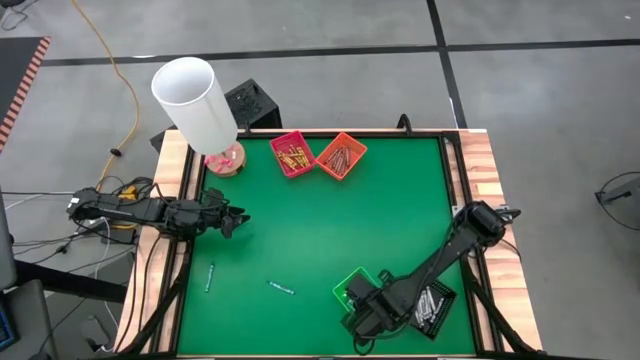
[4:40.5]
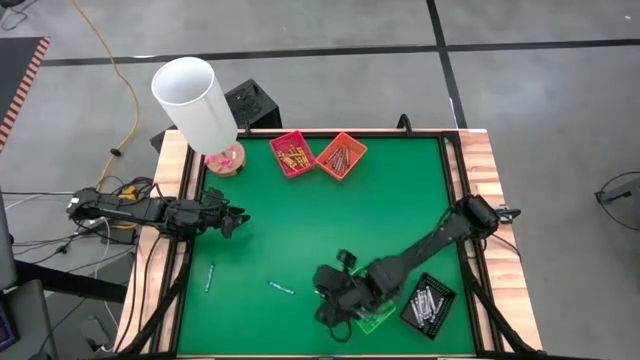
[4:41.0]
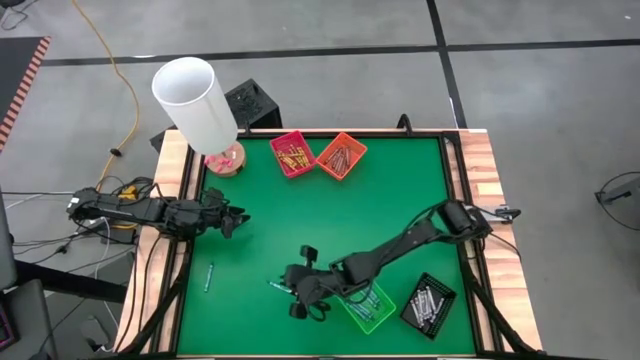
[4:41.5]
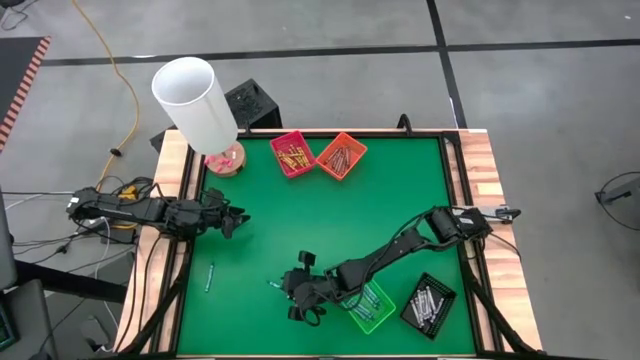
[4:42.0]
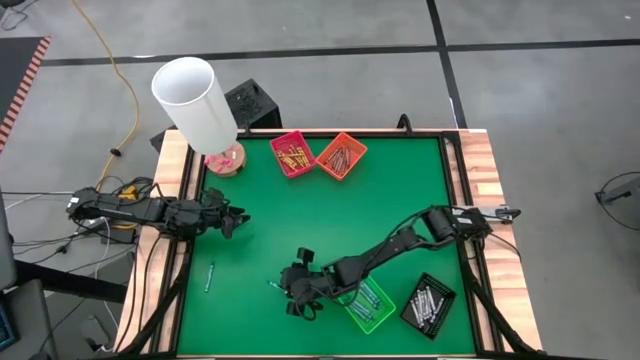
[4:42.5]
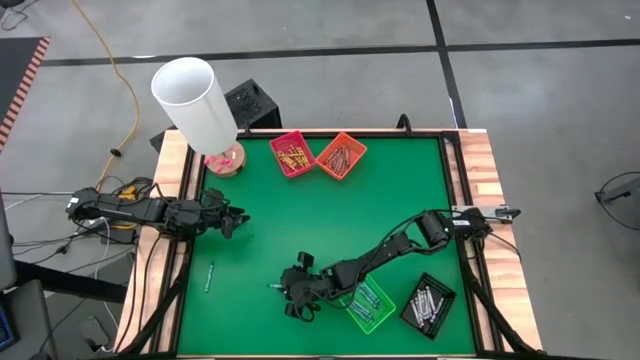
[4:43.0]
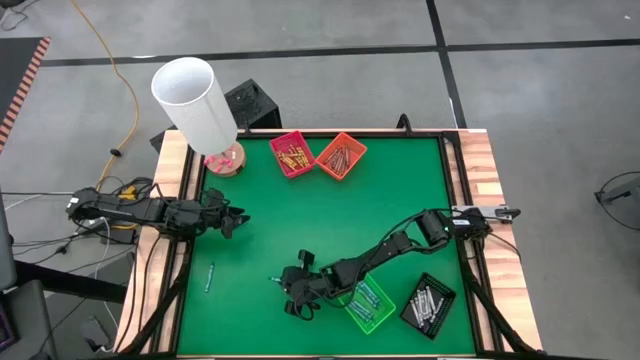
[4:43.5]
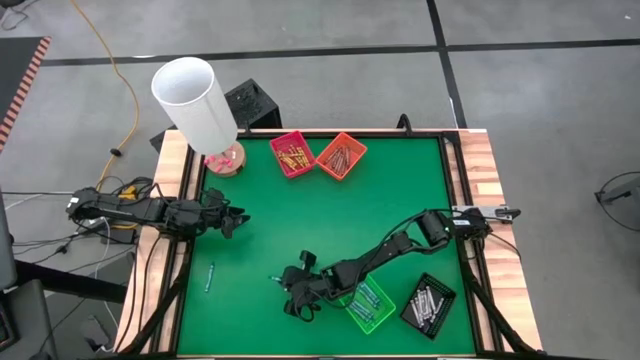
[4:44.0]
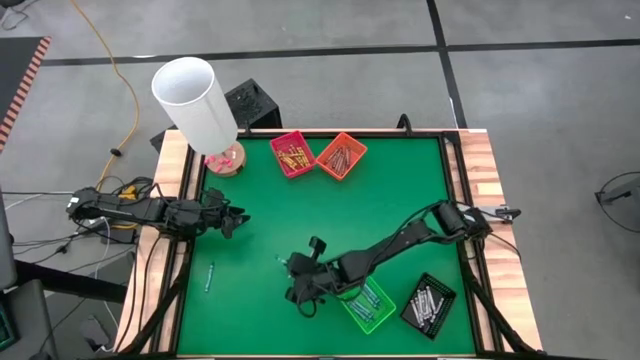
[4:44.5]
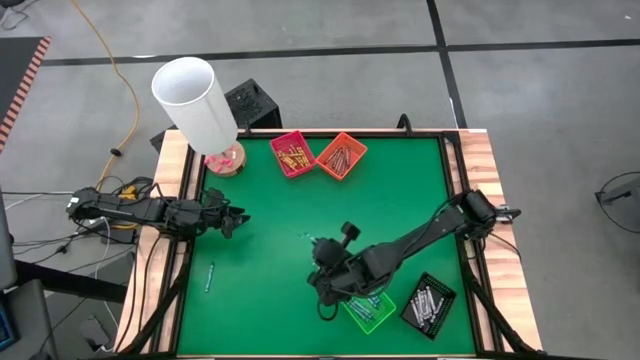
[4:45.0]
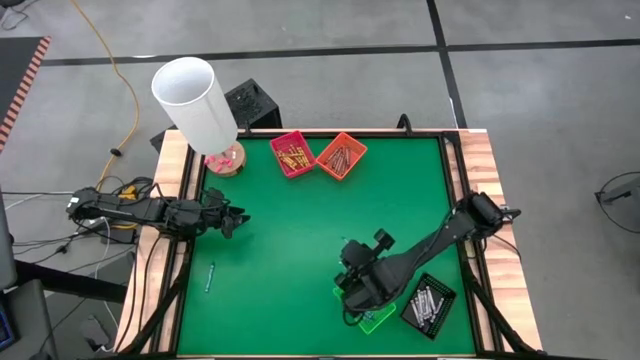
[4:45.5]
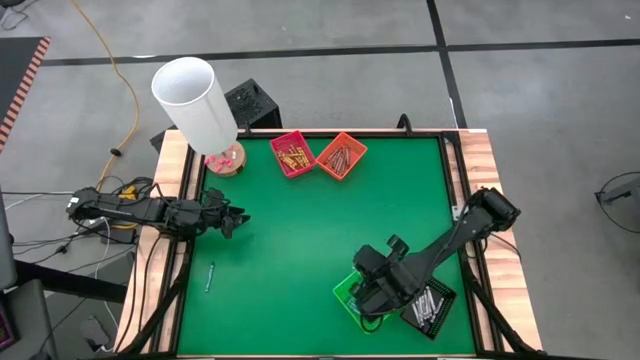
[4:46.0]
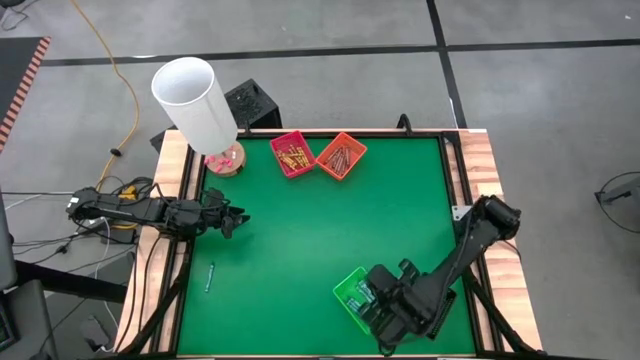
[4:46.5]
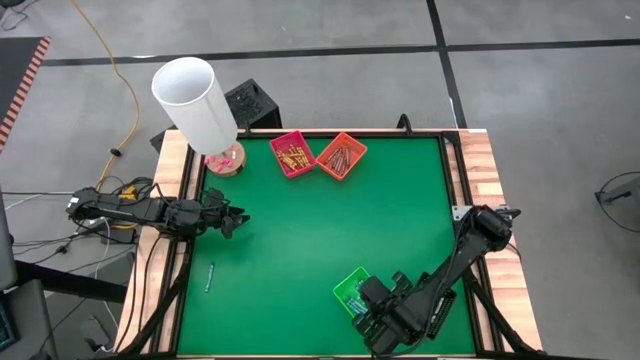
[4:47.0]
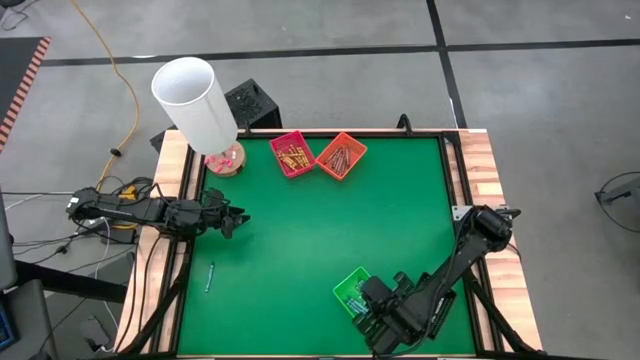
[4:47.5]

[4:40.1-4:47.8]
Task: Sort crayons
Put the green crayon into the green bin

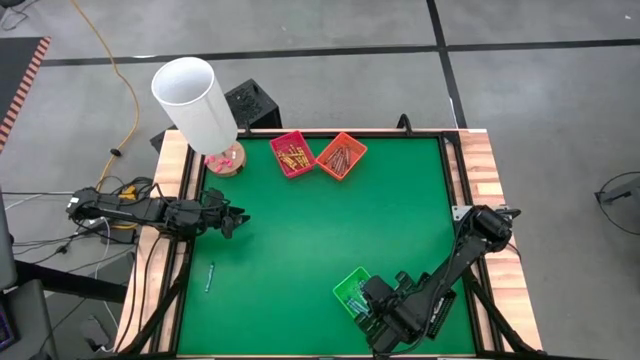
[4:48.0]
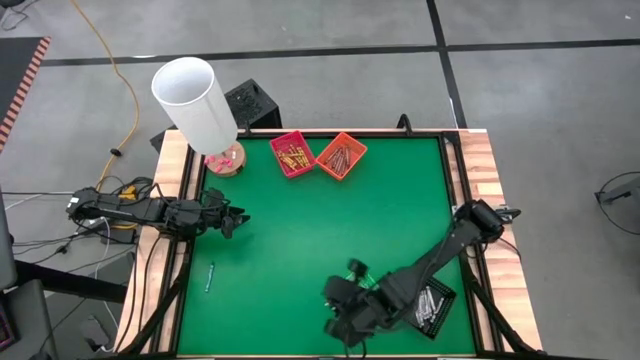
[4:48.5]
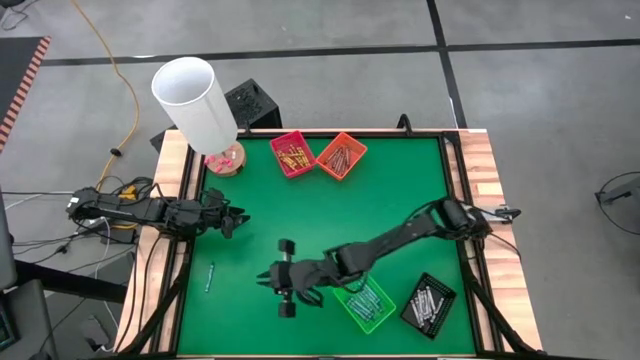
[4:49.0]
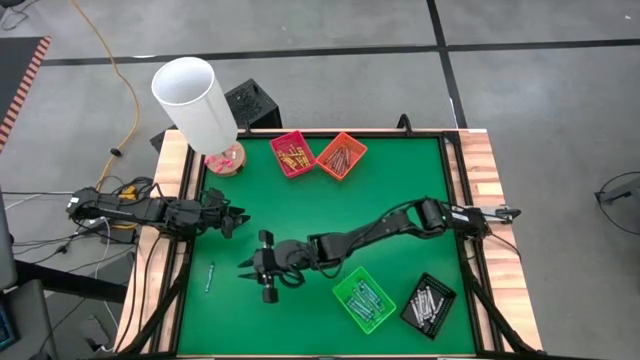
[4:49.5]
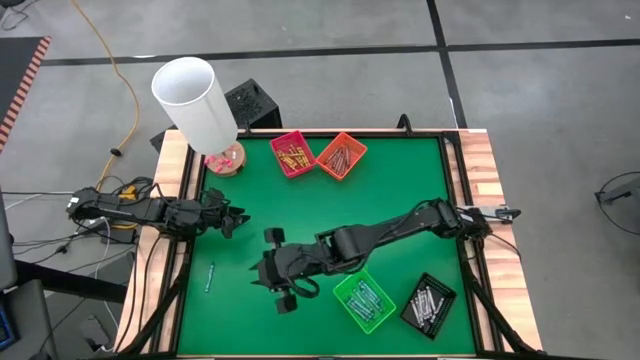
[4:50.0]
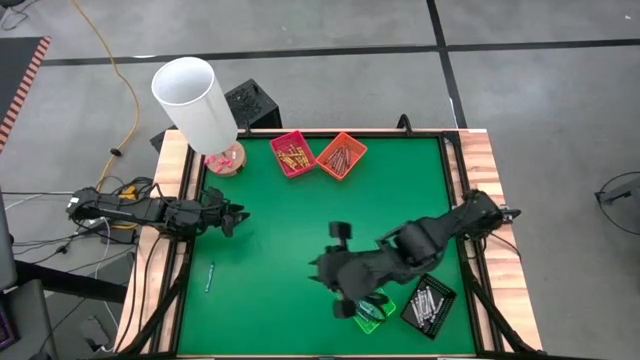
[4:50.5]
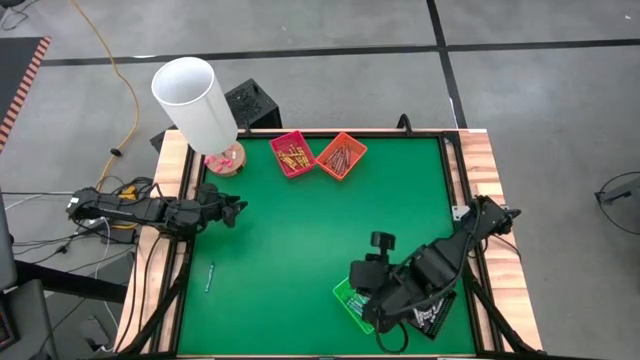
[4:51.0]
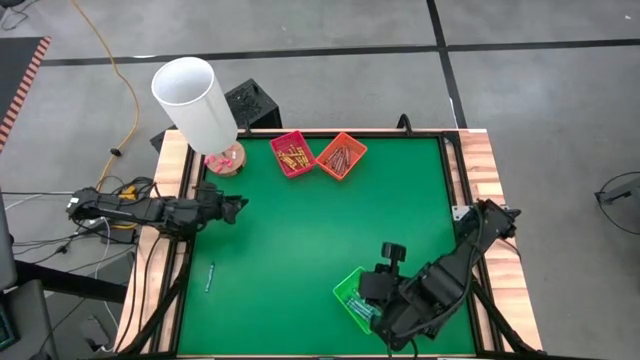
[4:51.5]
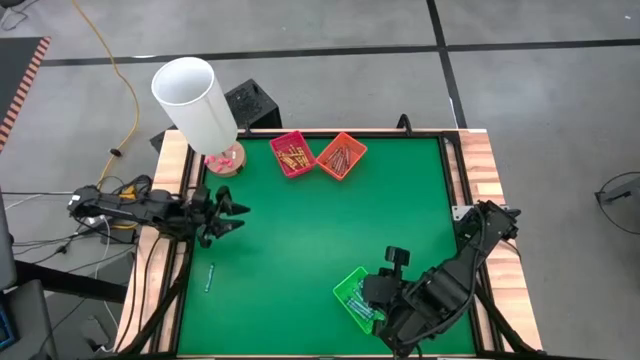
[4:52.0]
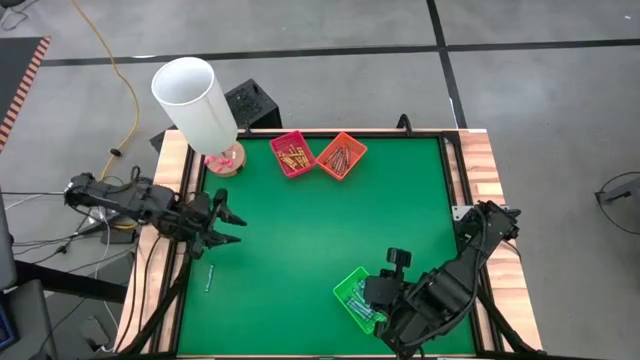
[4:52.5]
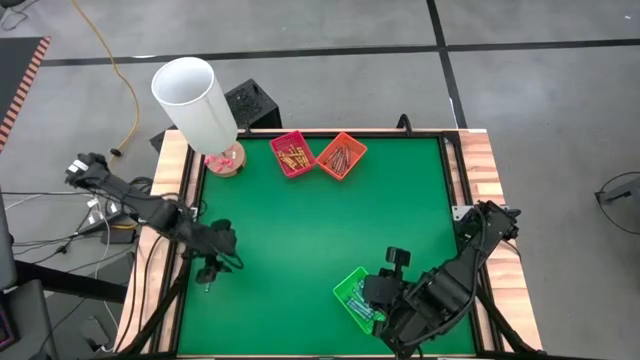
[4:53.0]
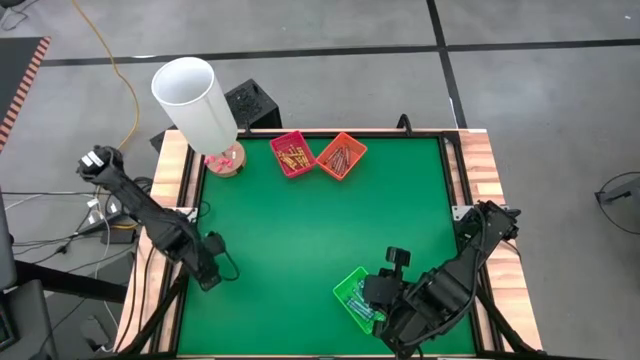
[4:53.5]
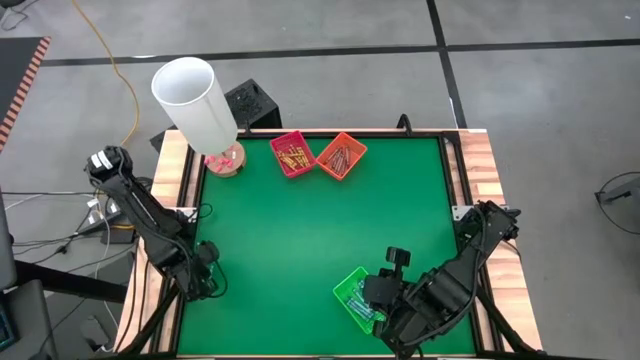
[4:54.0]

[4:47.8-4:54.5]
Put the green crayon into the green bin

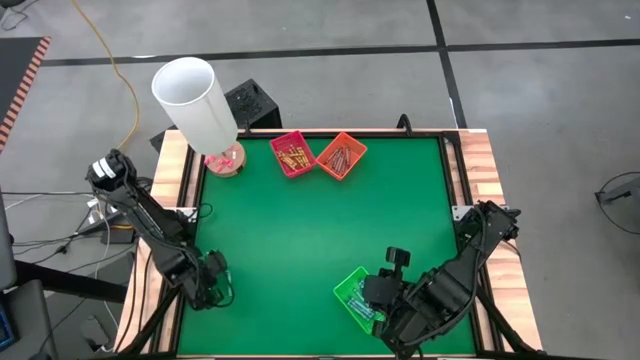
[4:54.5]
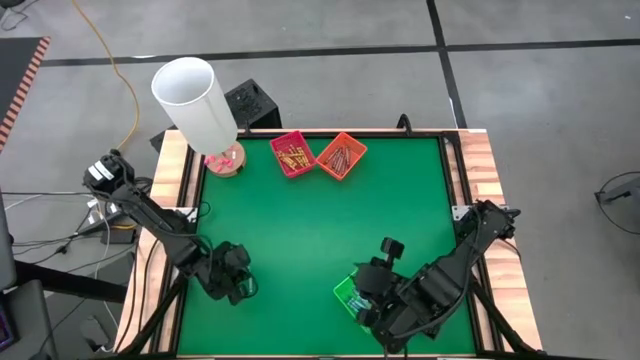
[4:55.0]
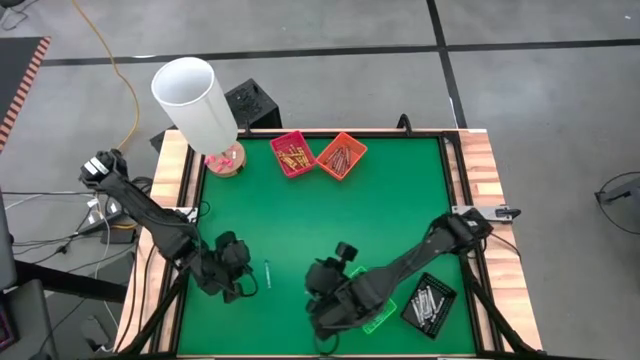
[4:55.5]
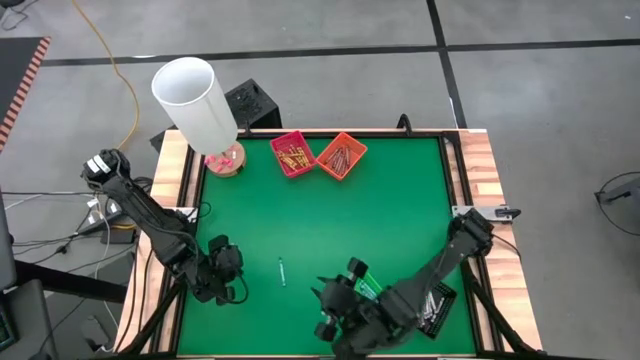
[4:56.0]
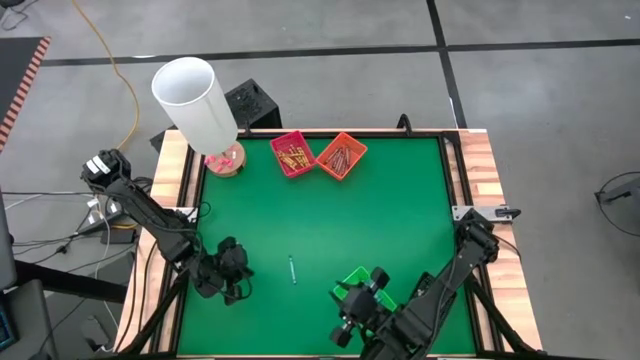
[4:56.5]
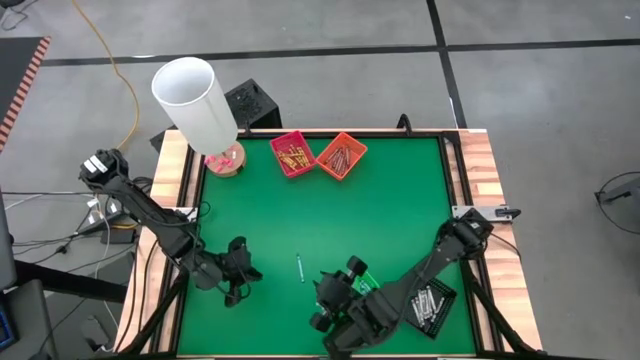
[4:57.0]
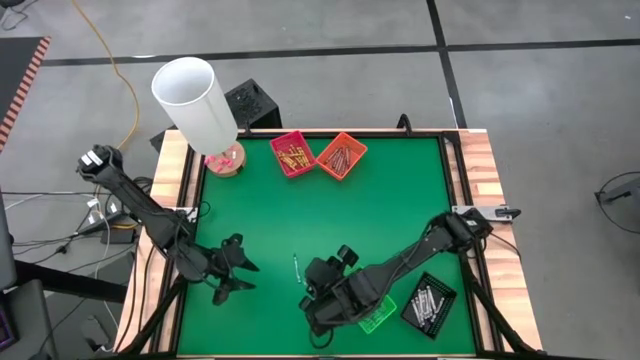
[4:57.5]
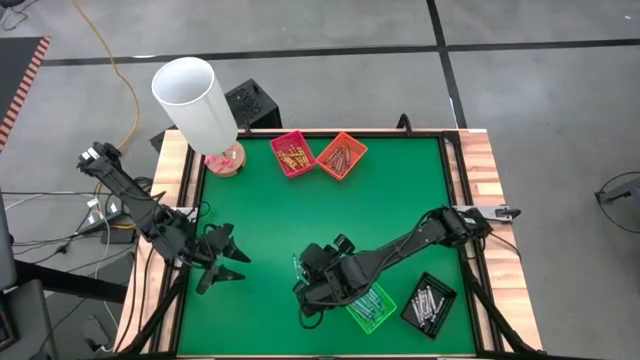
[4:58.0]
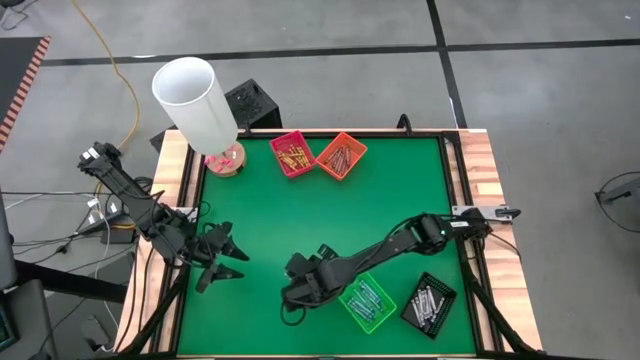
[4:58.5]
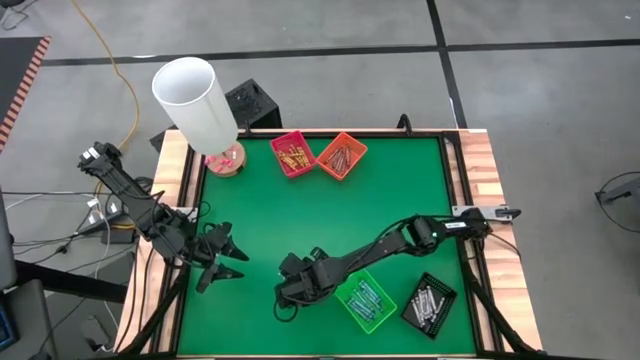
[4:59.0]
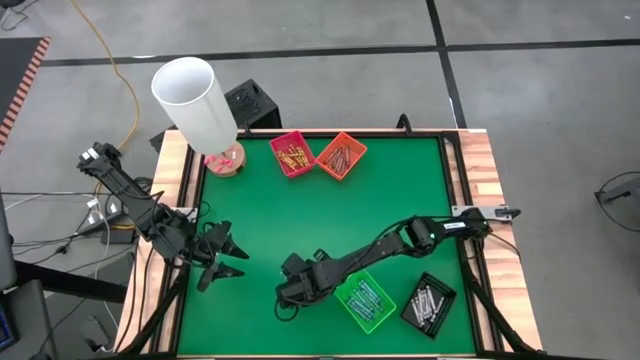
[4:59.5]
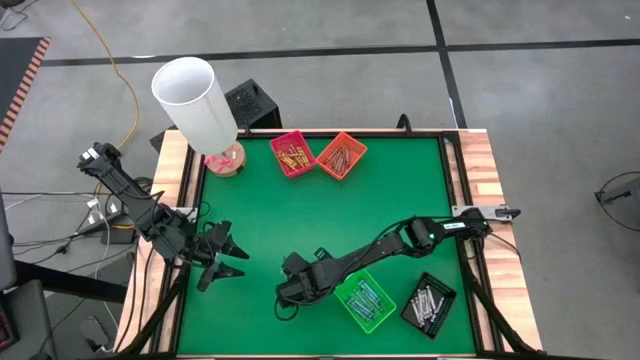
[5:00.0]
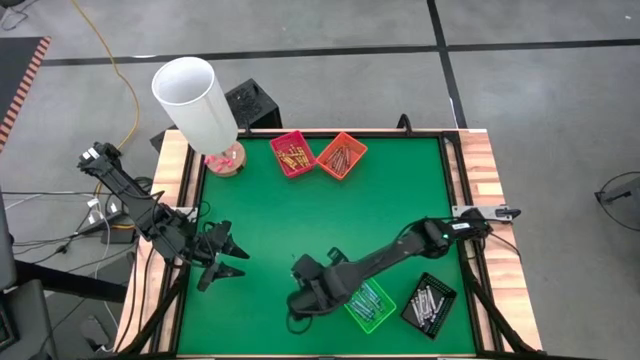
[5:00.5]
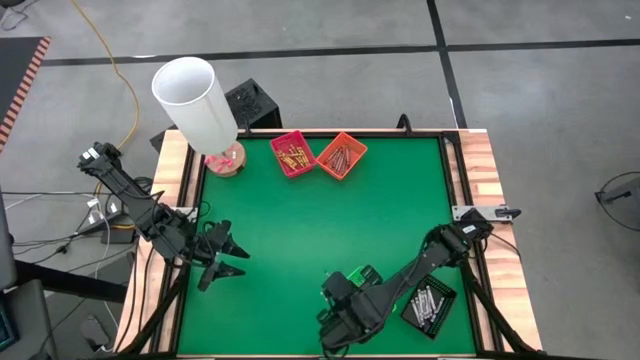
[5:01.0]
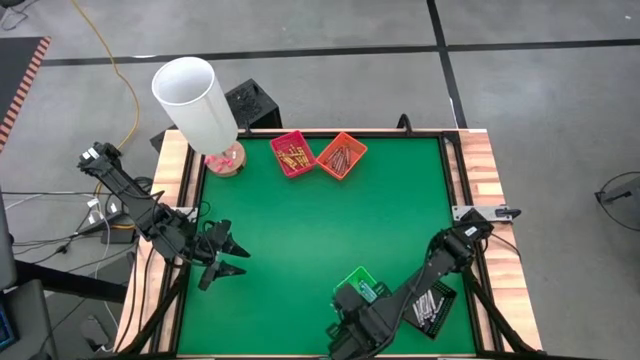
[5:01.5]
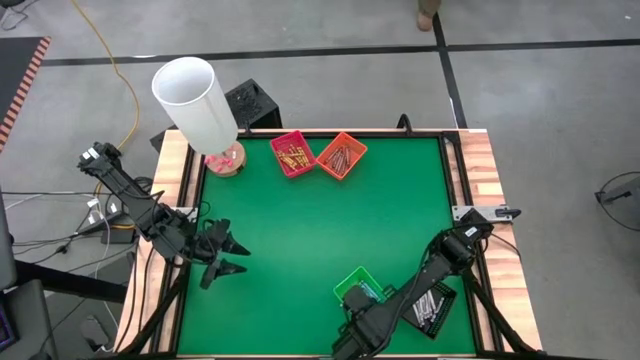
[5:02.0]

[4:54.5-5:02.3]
Put the green crayon into the green bin

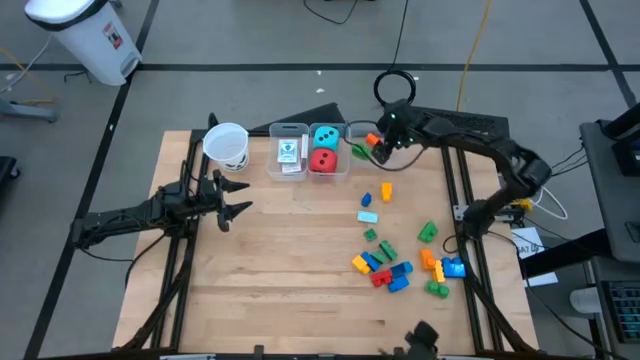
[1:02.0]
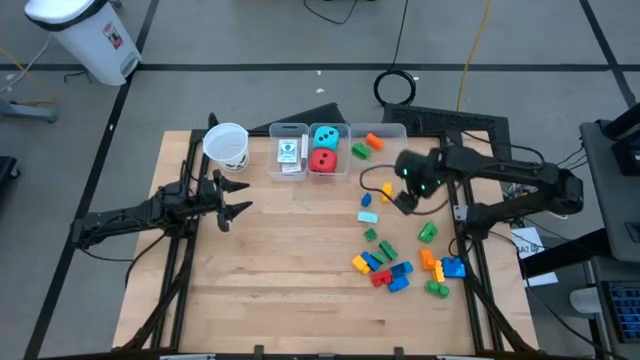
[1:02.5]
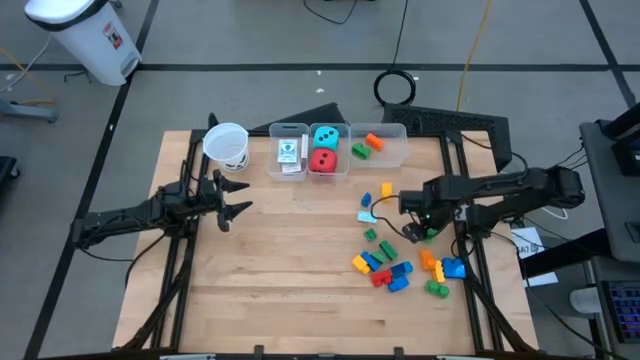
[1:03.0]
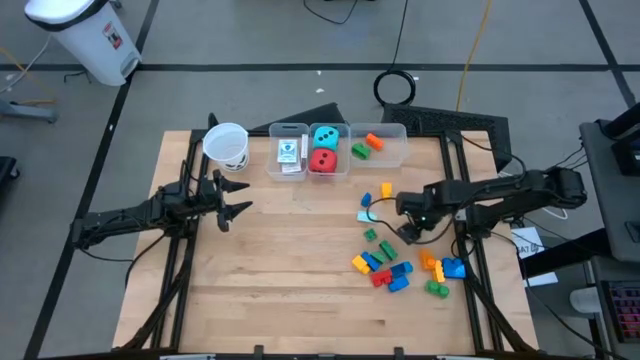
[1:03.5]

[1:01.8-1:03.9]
Task: Pick & Place Toys
Put the green game piece into the right transparent bin
